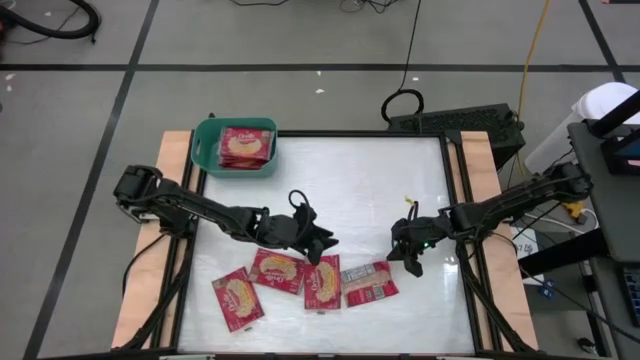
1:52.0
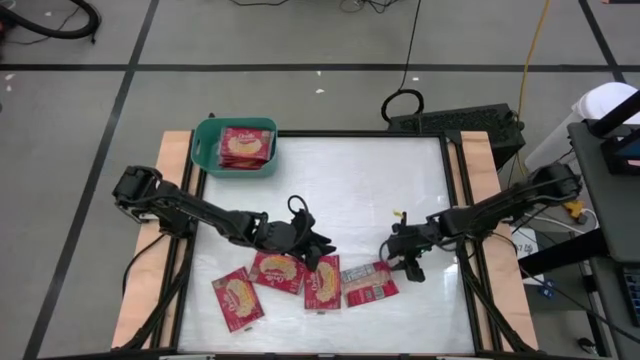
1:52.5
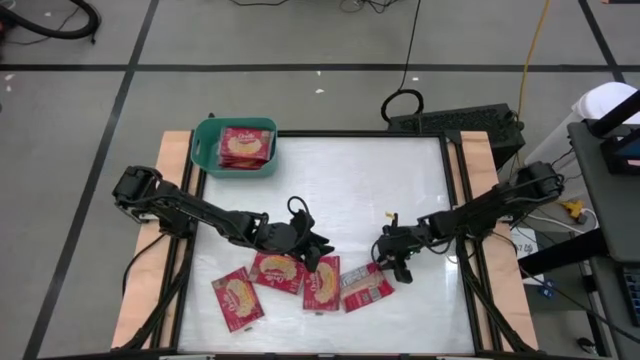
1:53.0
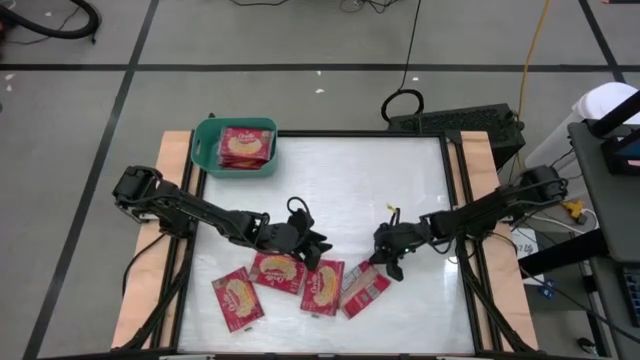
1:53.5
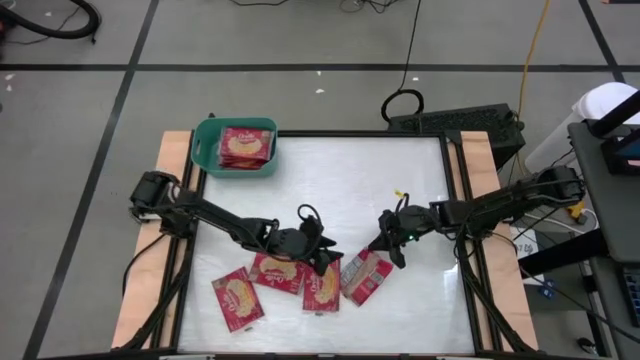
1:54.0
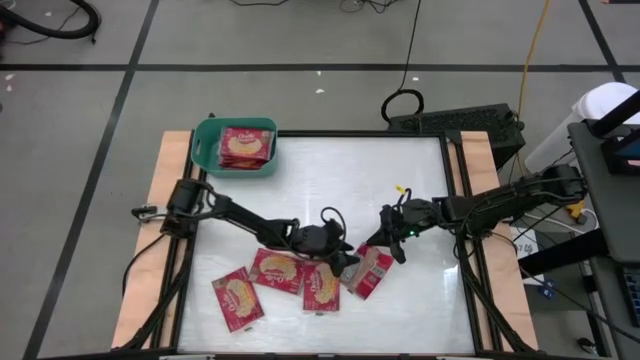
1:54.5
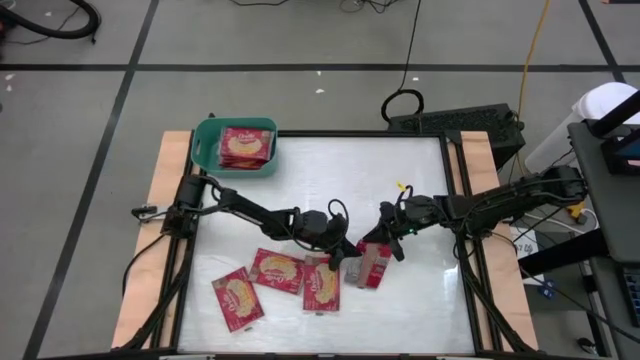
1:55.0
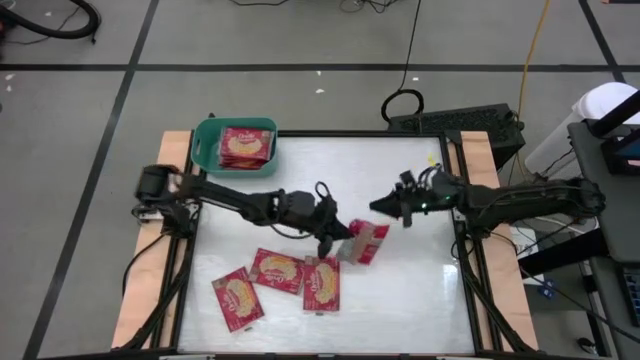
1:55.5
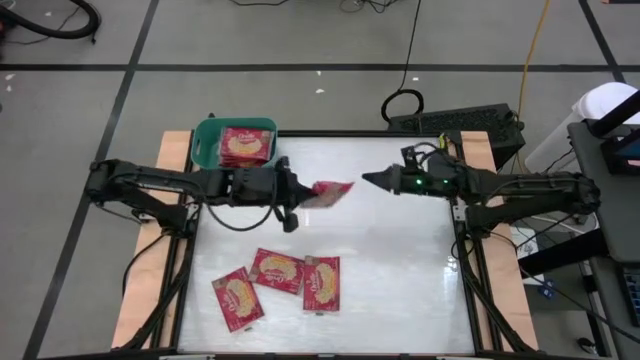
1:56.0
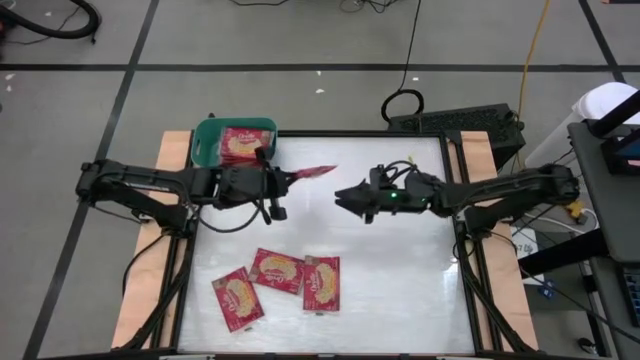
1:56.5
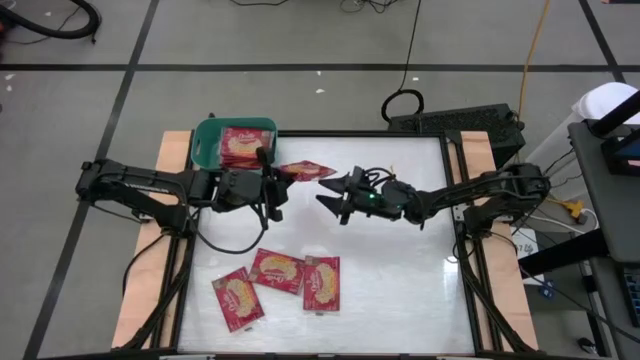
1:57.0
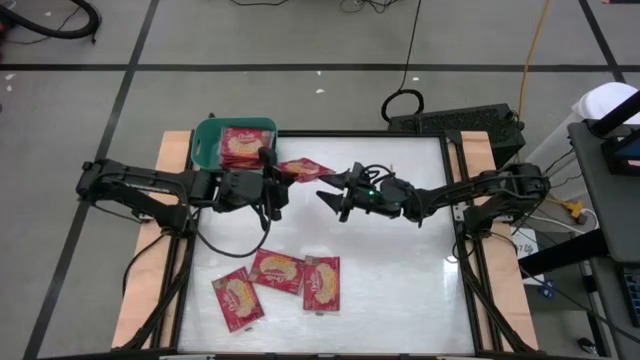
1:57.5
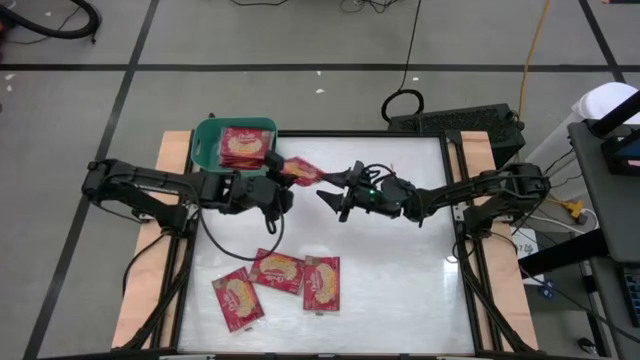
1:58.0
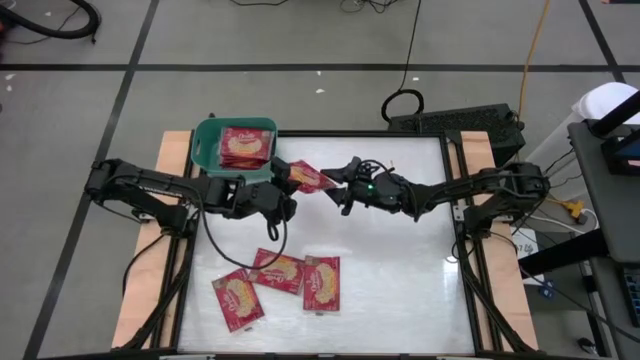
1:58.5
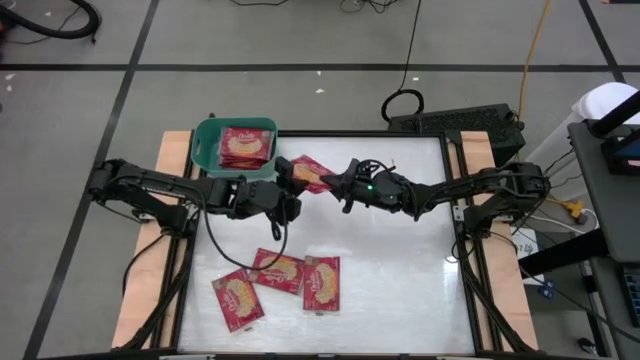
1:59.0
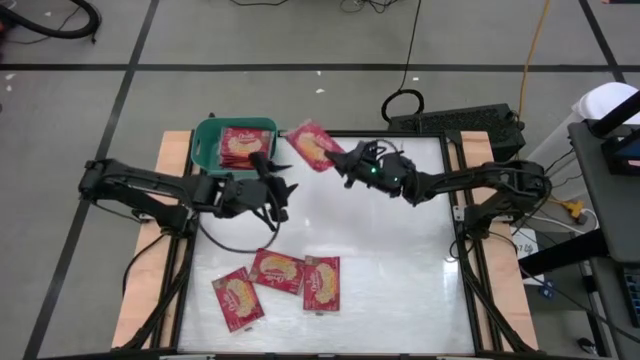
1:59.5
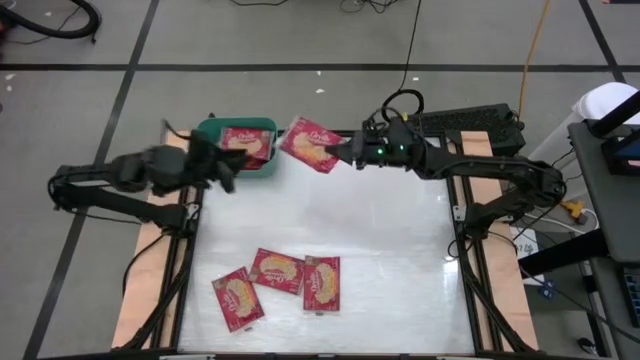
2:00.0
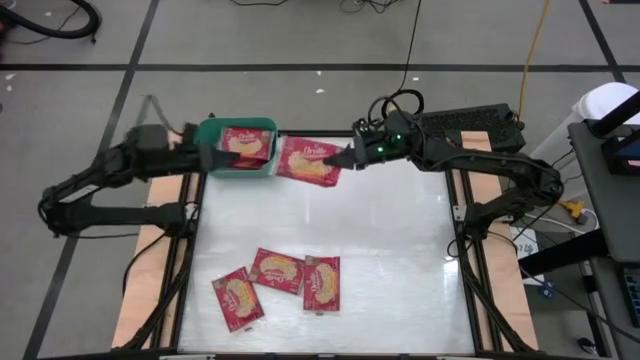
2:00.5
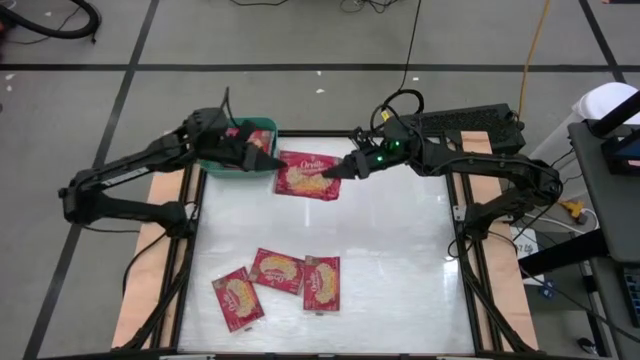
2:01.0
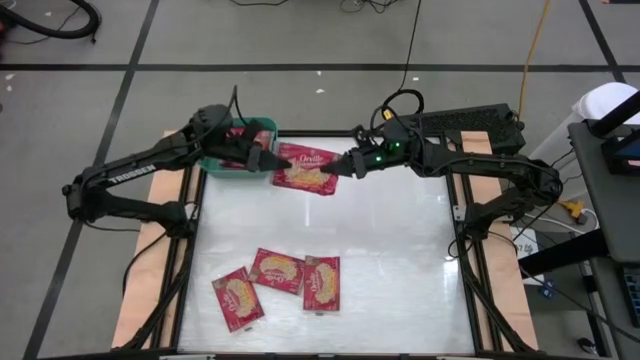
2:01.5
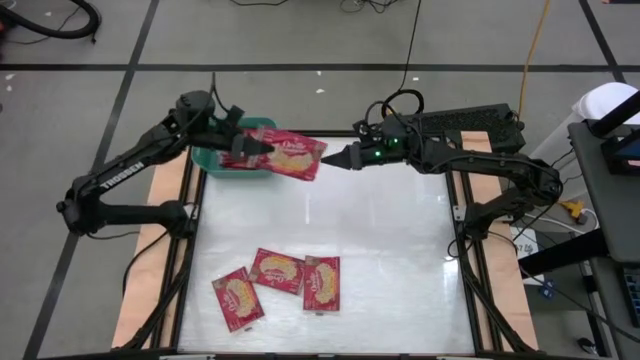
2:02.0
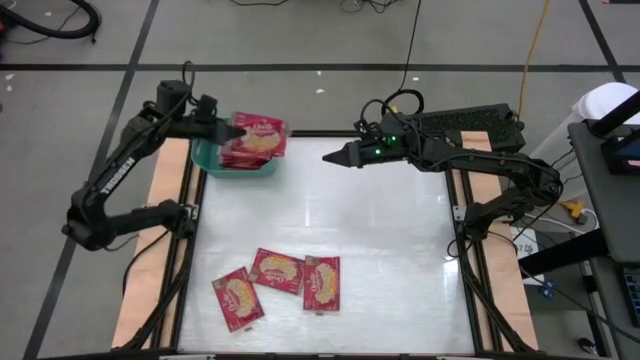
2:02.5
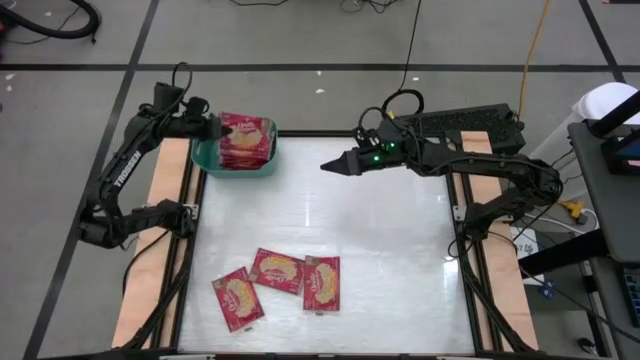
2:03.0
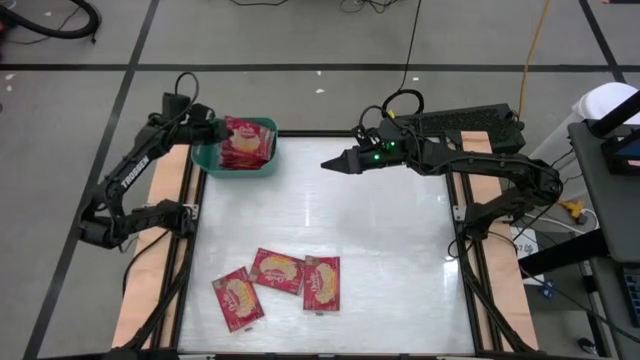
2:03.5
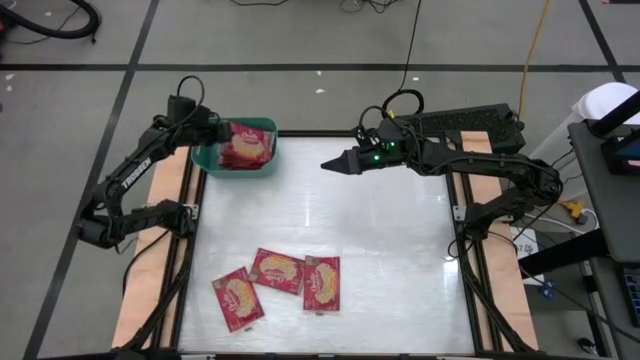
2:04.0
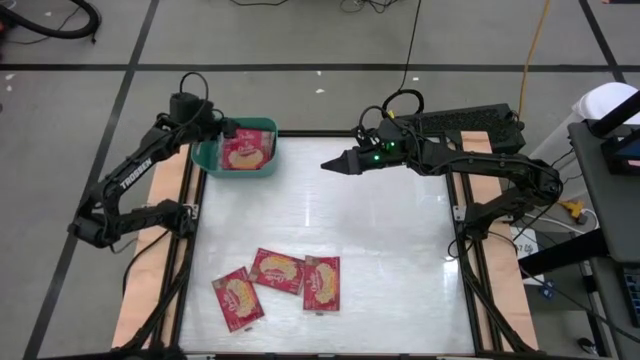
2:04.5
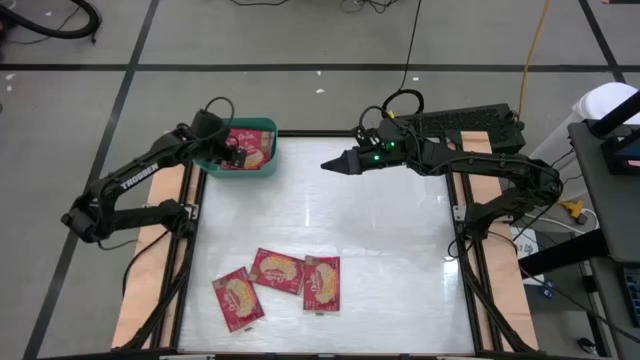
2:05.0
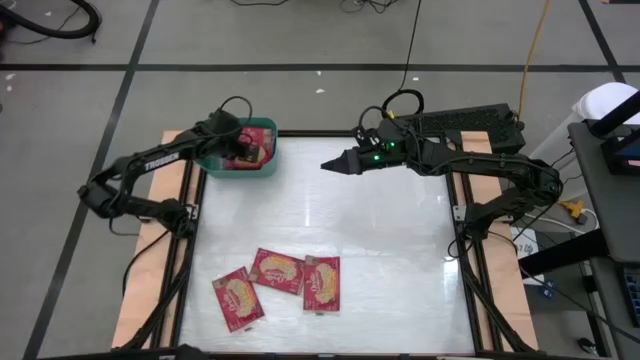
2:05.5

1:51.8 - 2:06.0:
Task: Sort popcorn bags into baskets
Put the red popcorn bag into the green bin

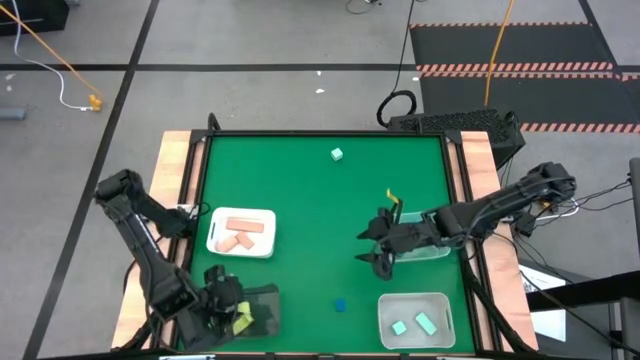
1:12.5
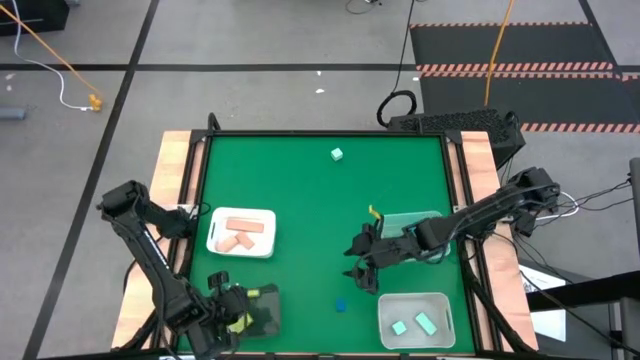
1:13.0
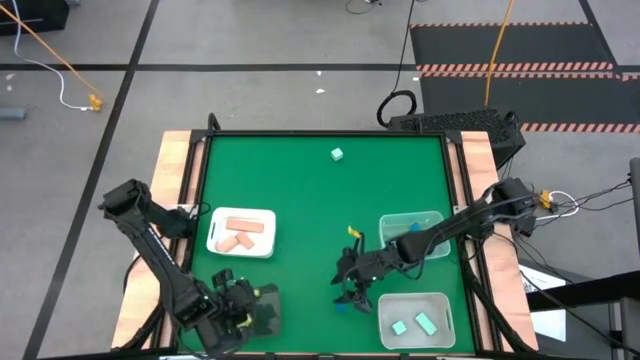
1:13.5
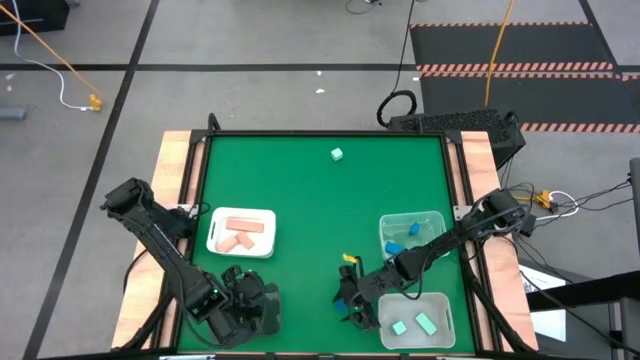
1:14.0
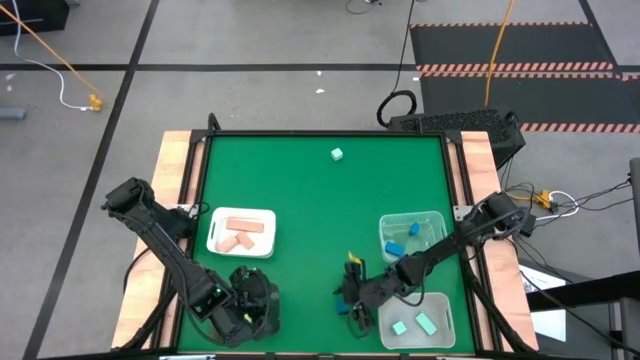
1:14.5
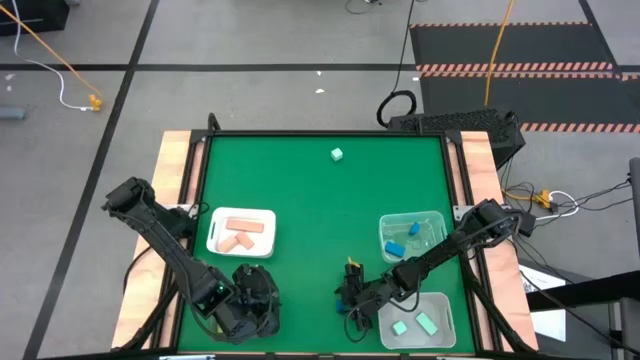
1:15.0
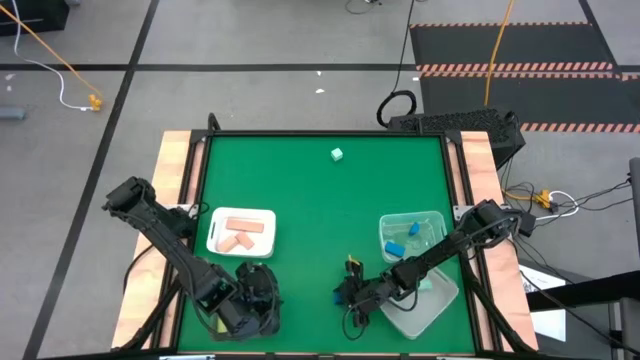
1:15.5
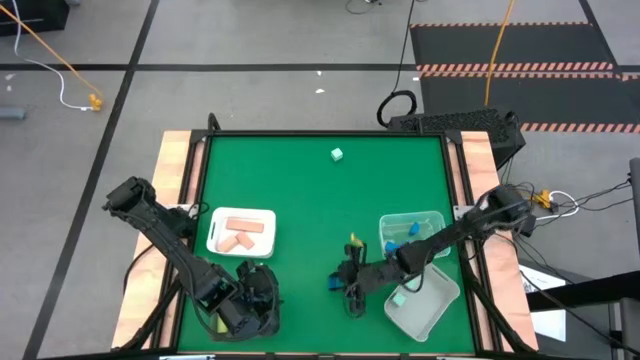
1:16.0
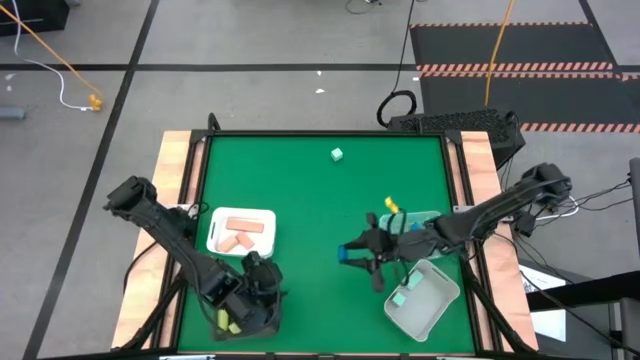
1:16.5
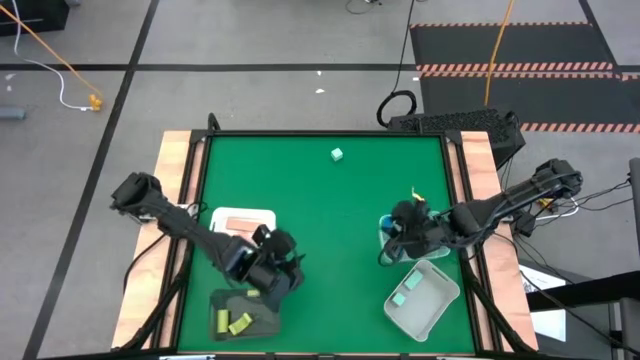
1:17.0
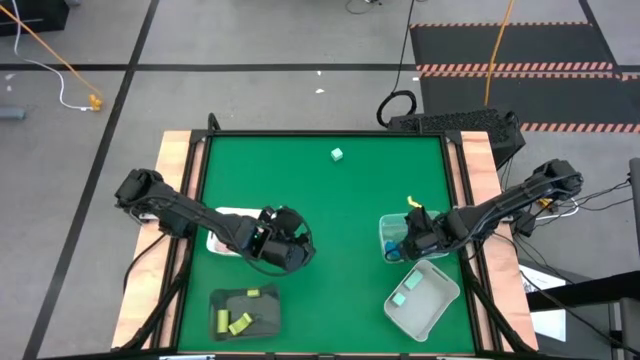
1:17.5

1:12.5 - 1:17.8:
Task: Sort & place blocks by color
Put the blue block into the transparent bin

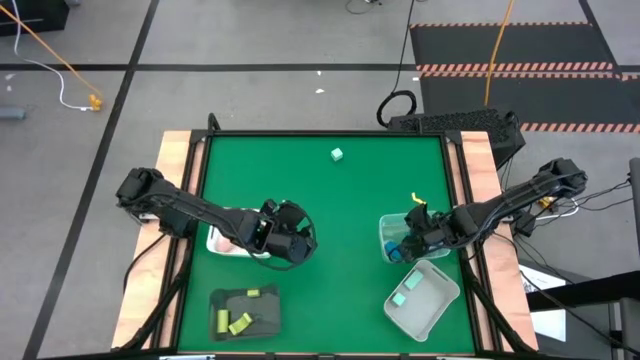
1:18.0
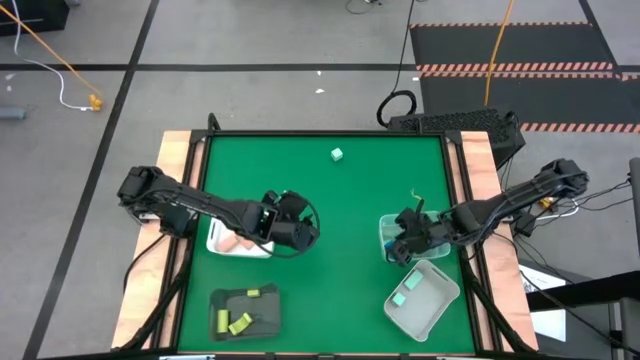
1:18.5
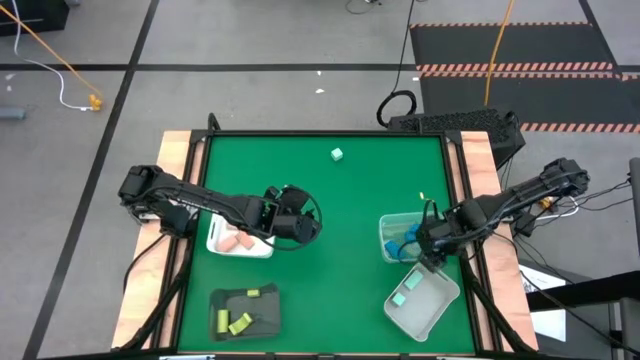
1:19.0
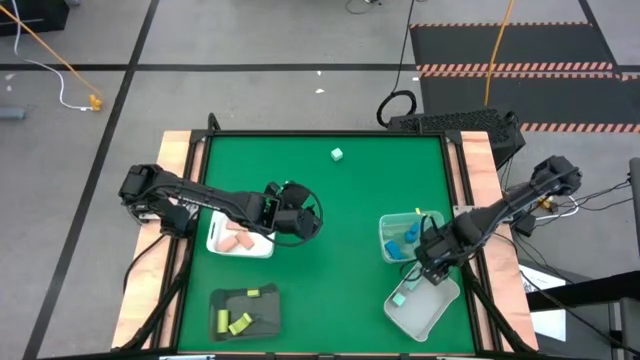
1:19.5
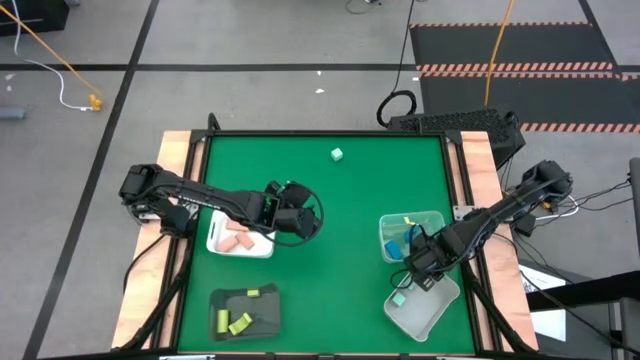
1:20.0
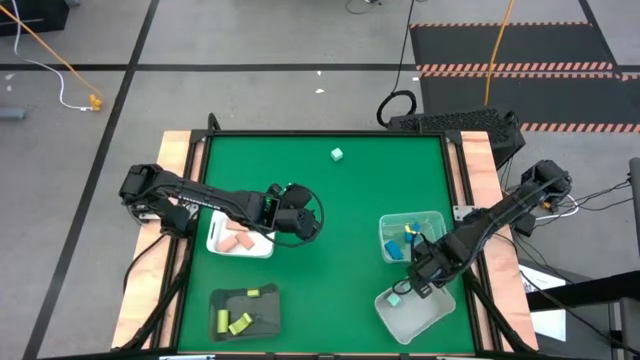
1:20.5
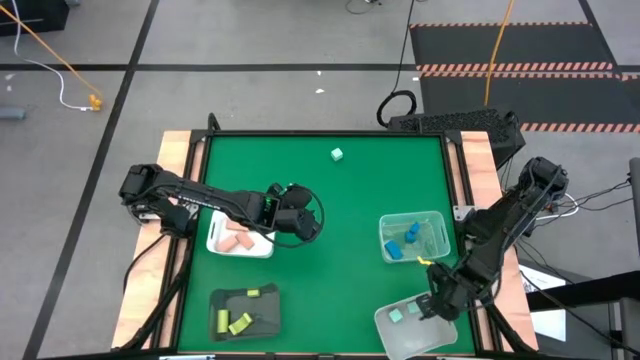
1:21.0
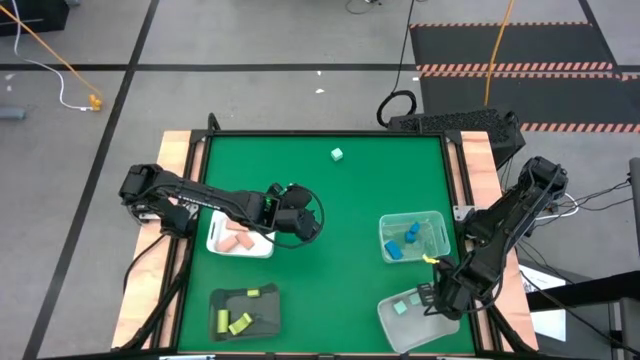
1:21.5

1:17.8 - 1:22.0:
Adjust the gray bin
